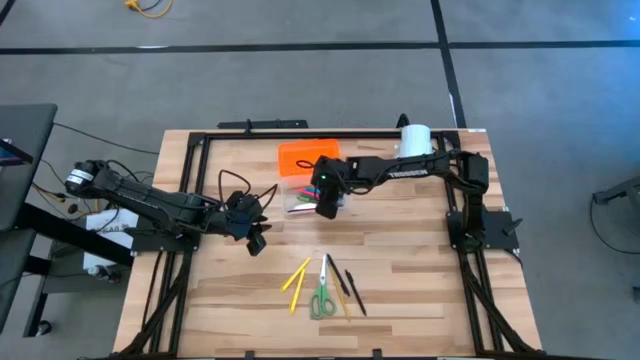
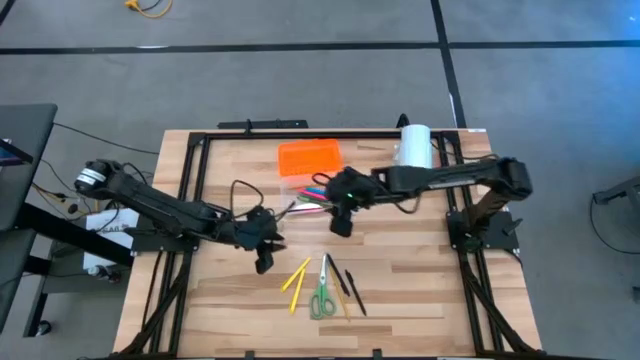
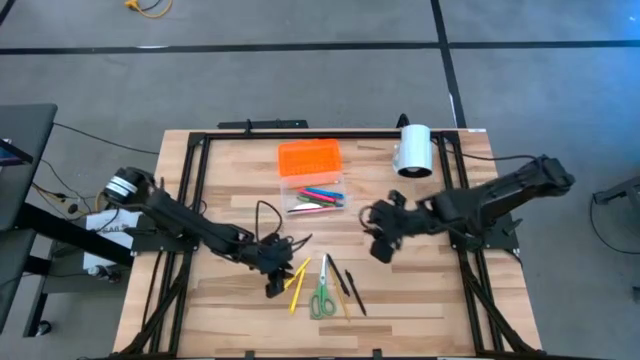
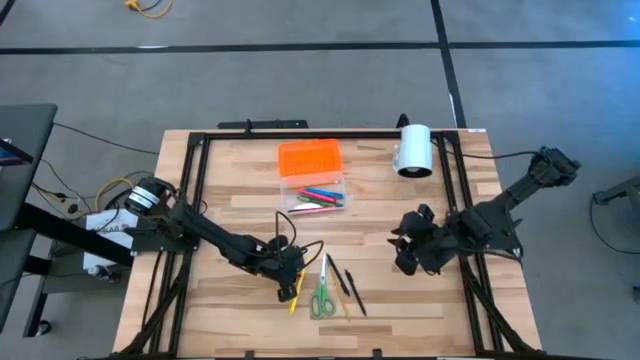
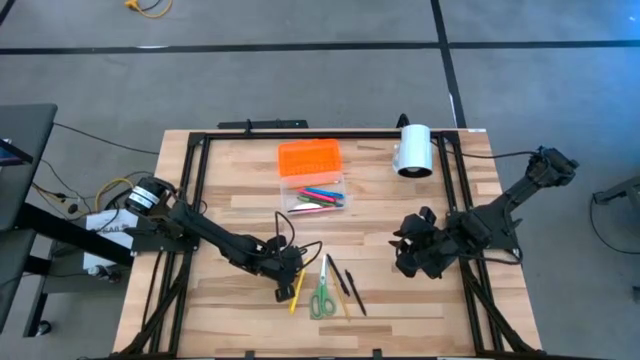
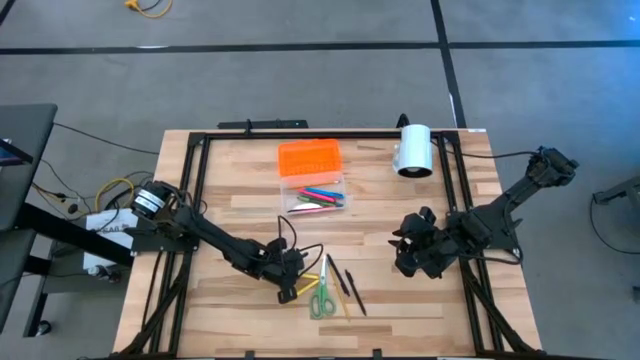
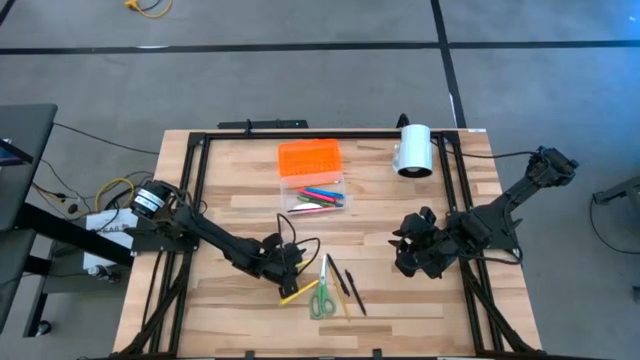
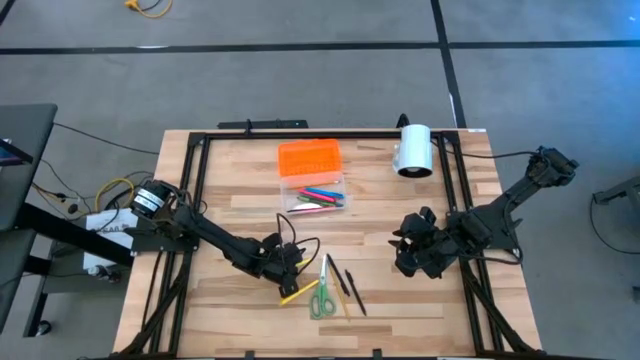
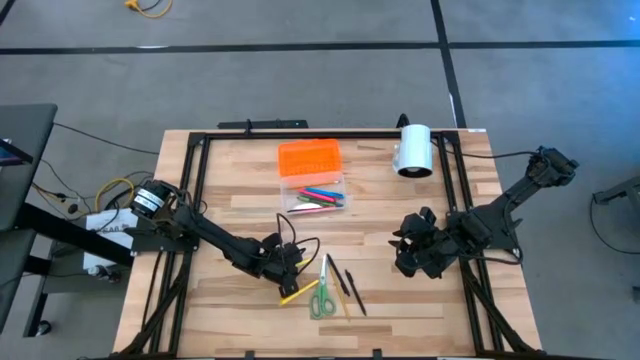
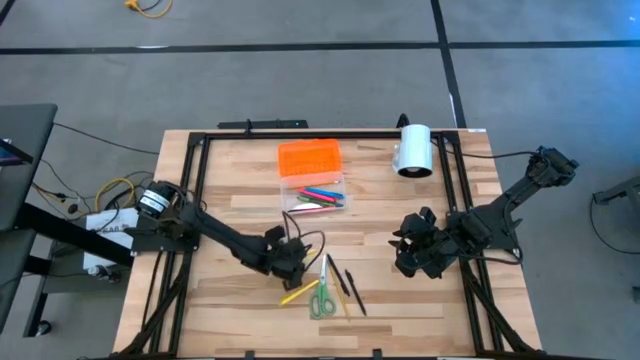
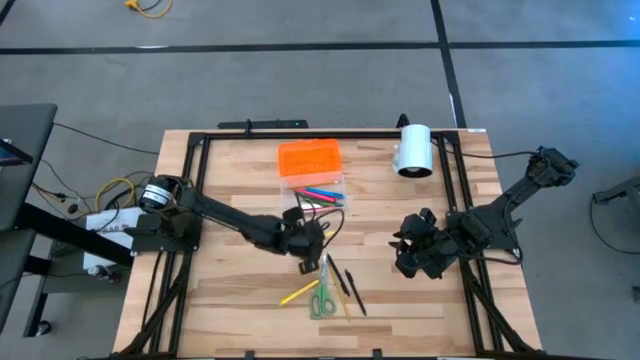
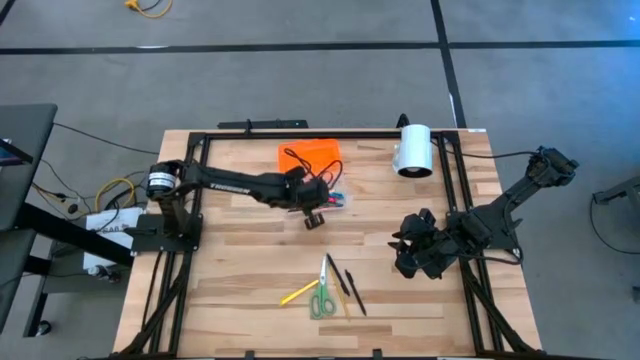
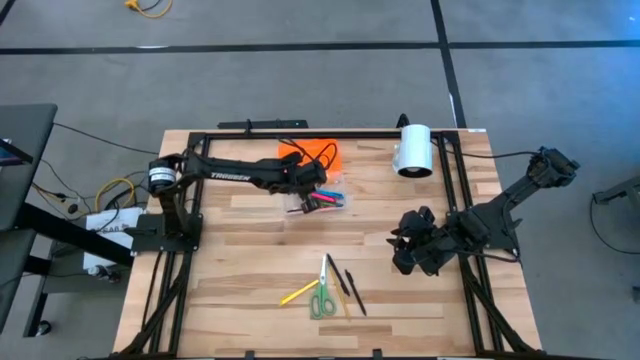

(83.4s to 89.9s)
Task: Pick & place school supplies into a supply box
Put the left yellow pen into the supply box

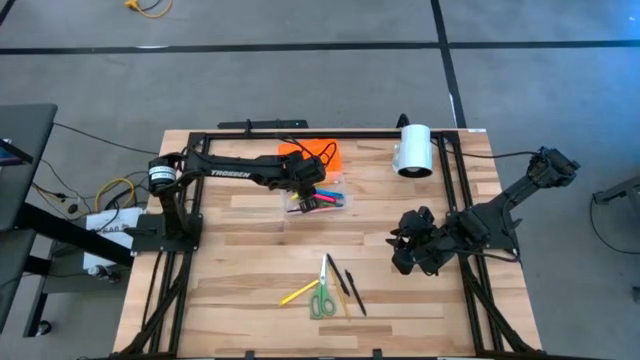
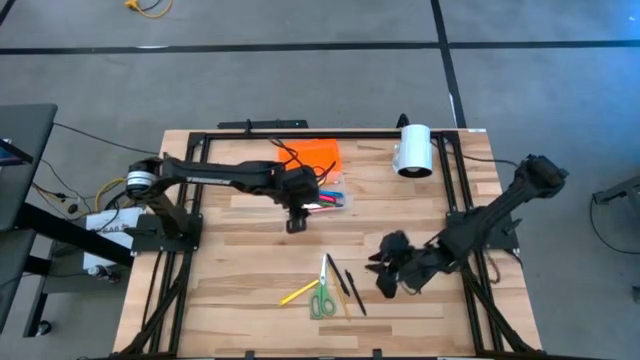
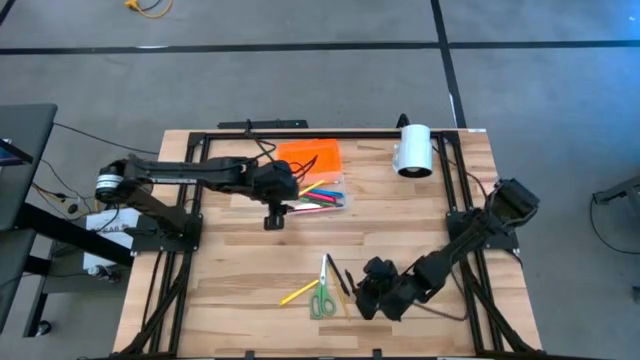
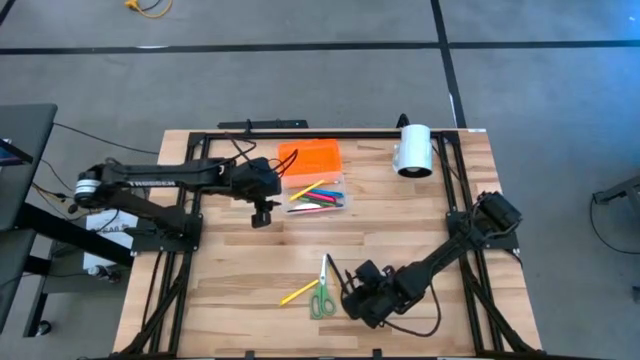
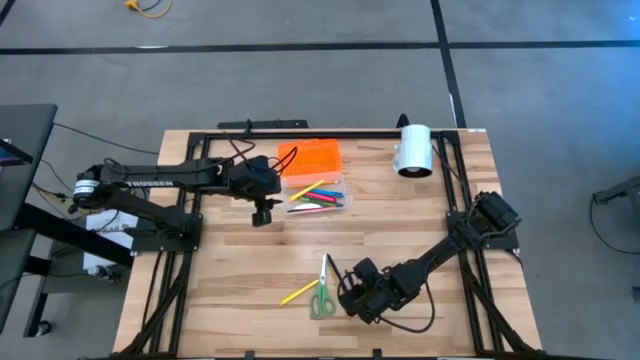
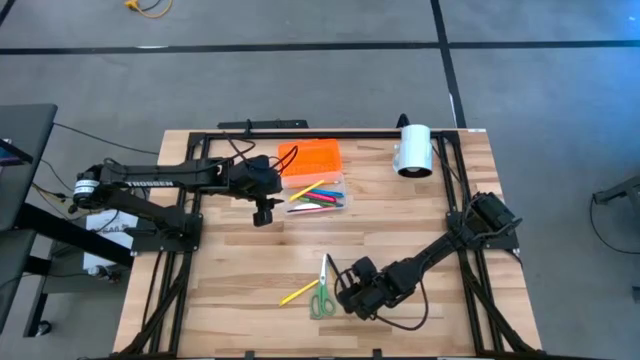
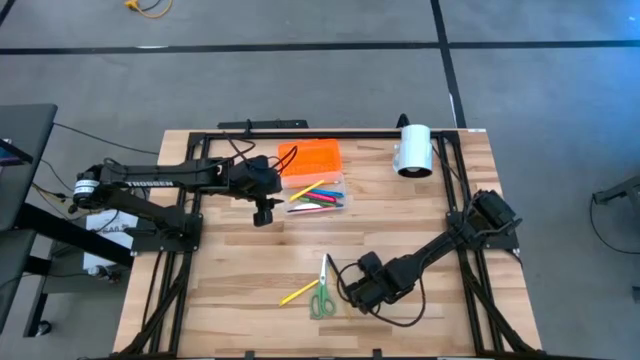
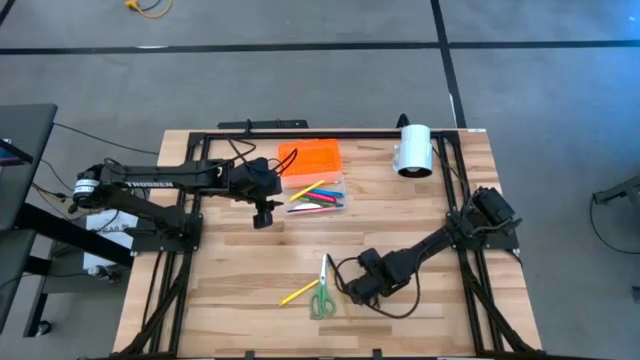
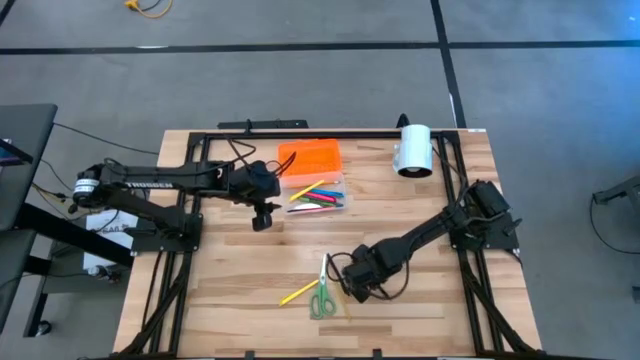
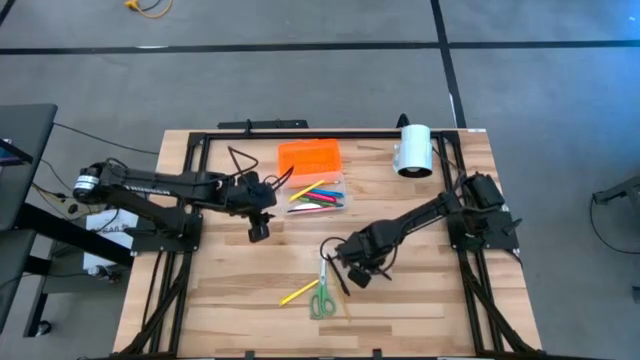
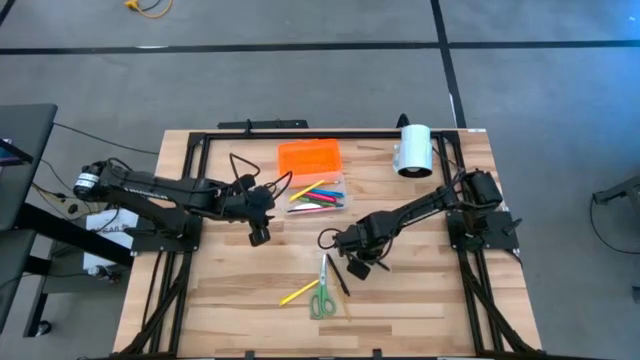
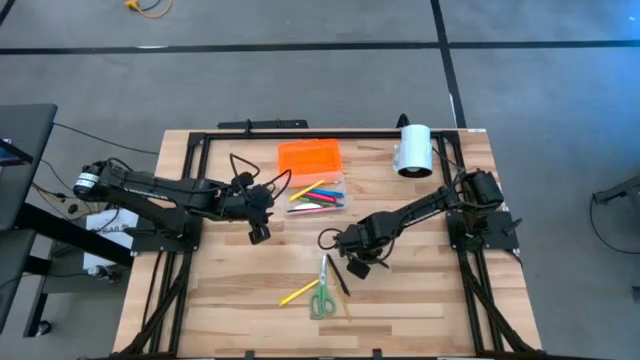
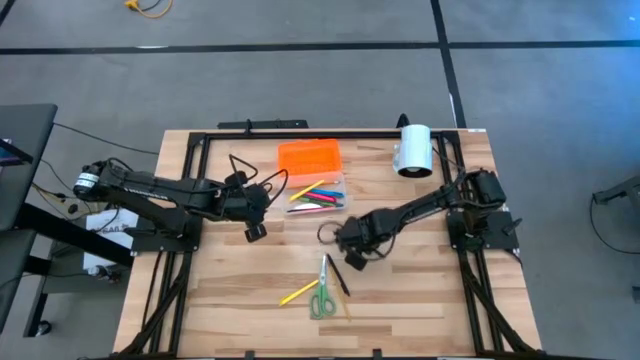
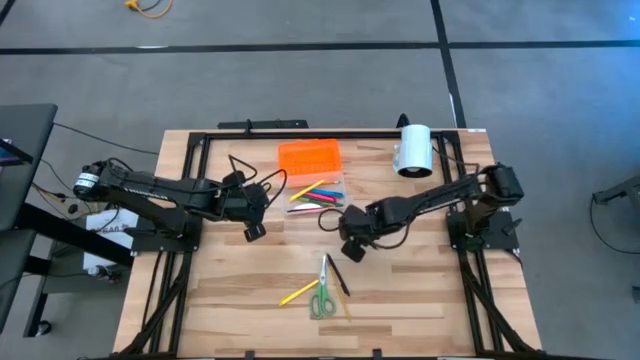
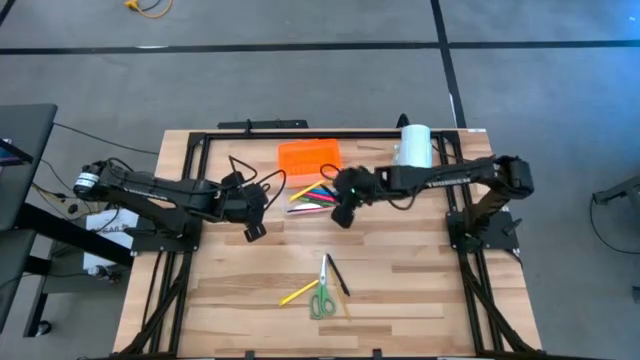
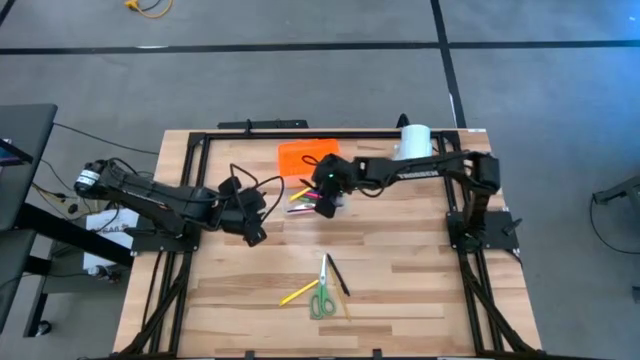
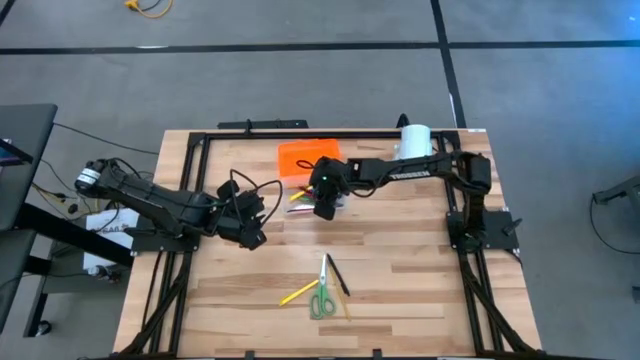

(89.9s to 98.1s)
Put the right black pen into the supply box

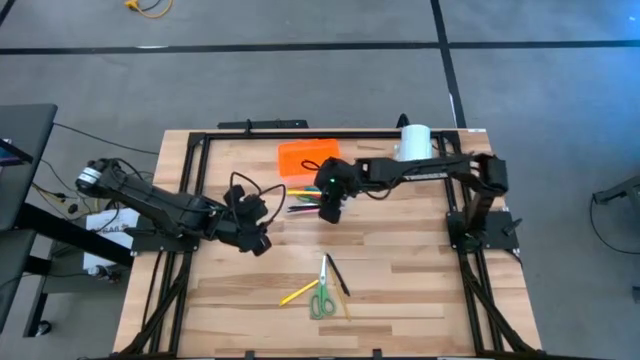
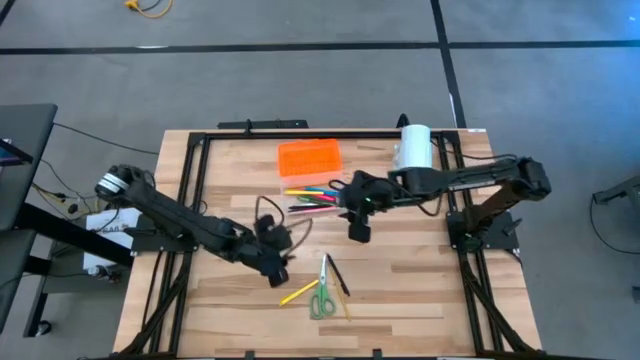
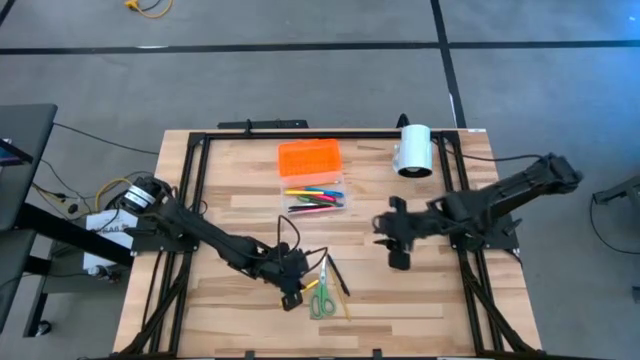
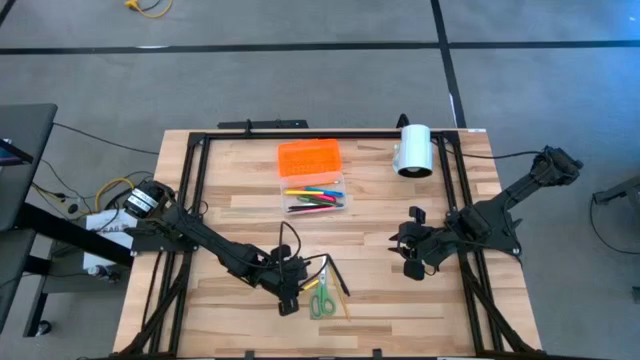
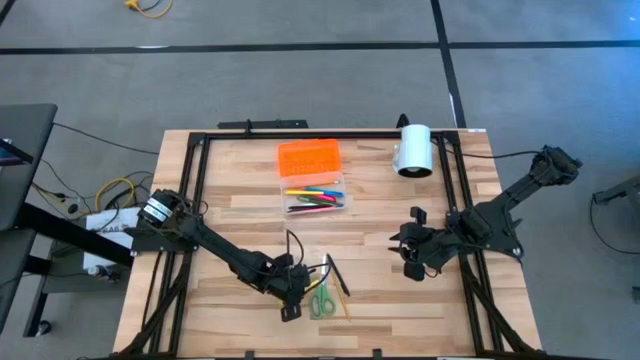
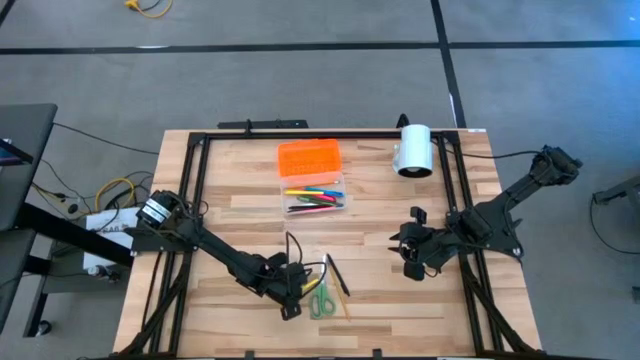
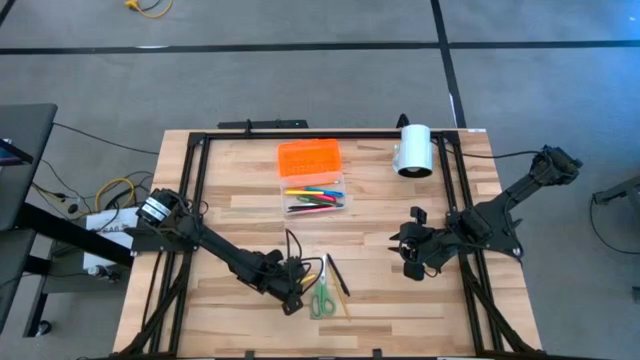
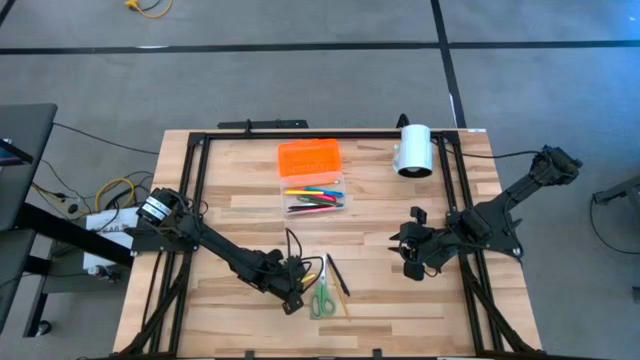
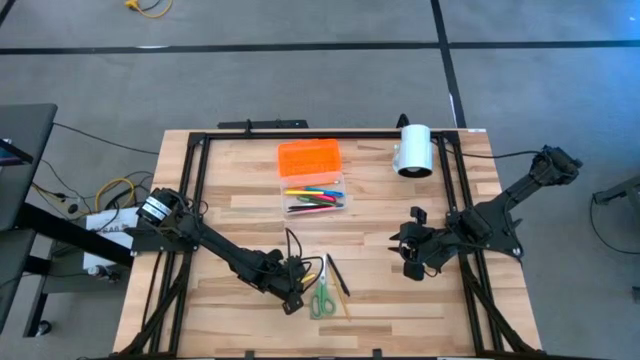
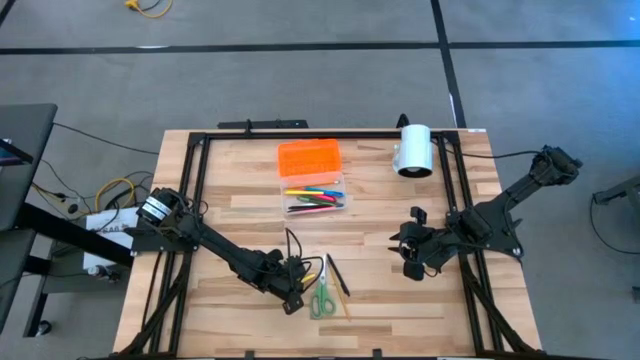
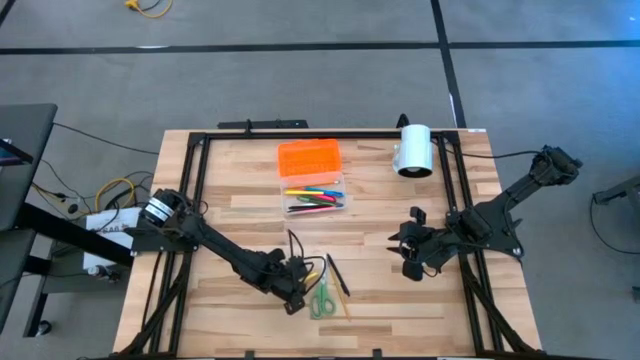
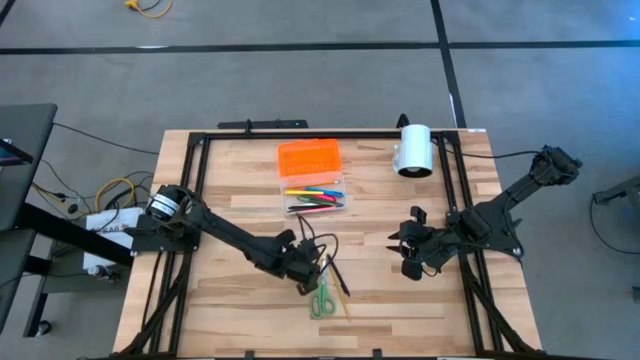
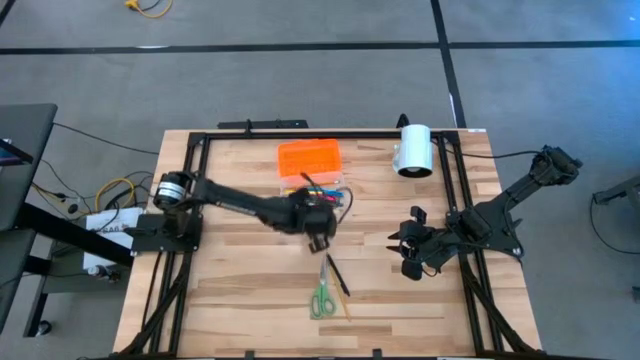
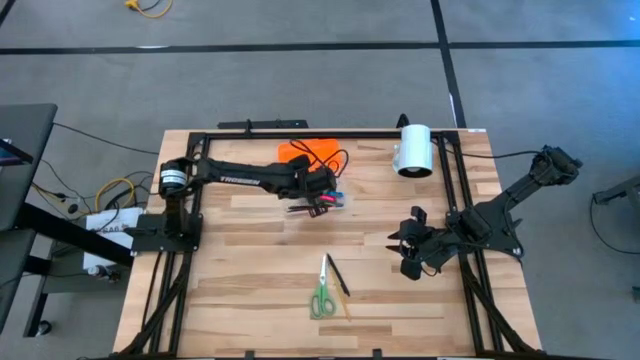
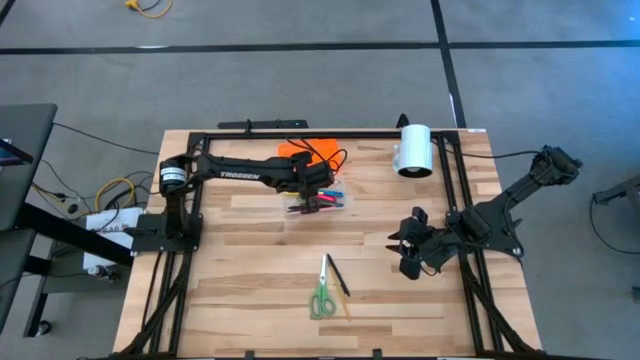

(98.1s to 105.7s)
Put the yellow pen into the supply box
